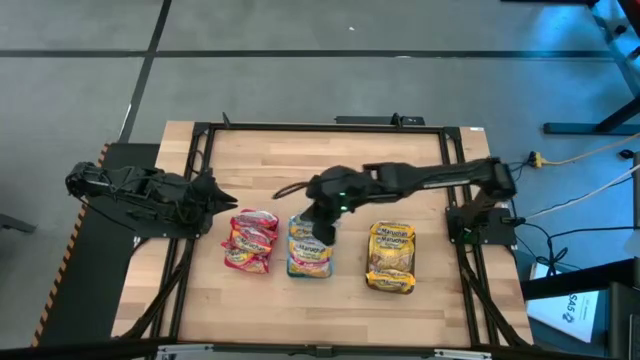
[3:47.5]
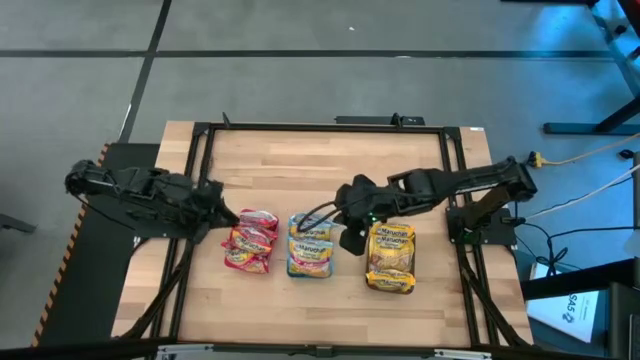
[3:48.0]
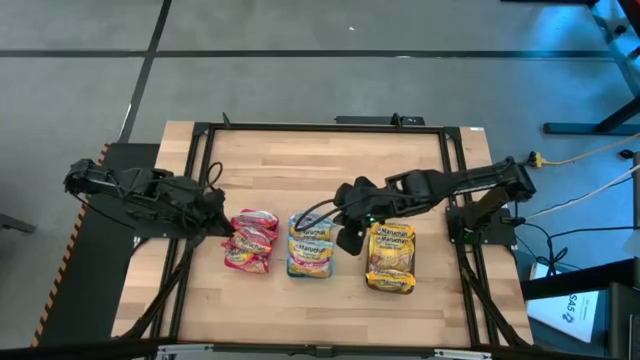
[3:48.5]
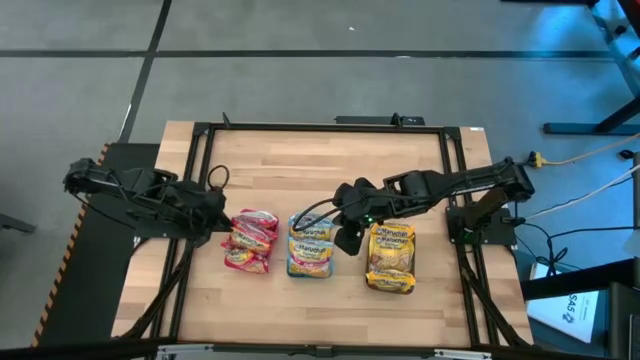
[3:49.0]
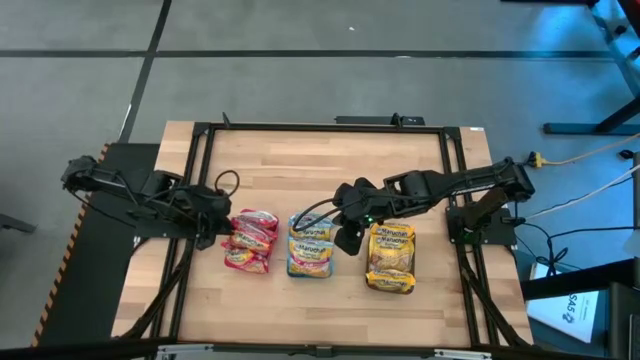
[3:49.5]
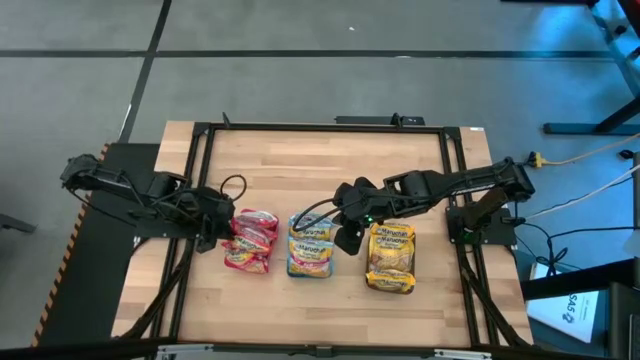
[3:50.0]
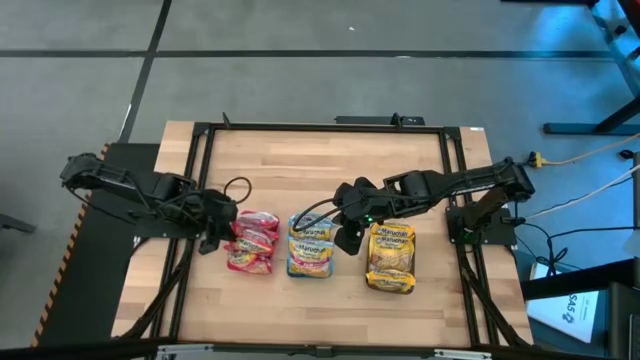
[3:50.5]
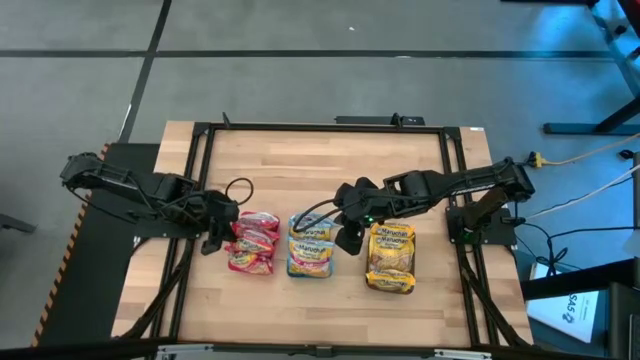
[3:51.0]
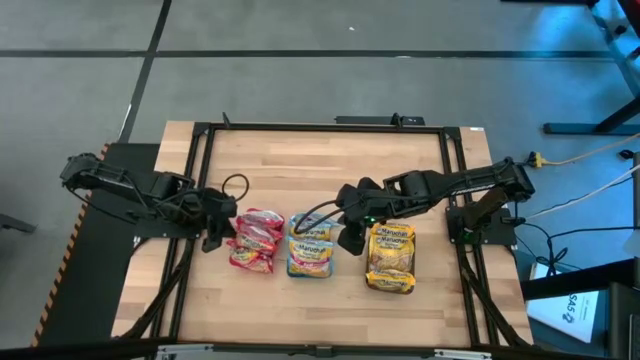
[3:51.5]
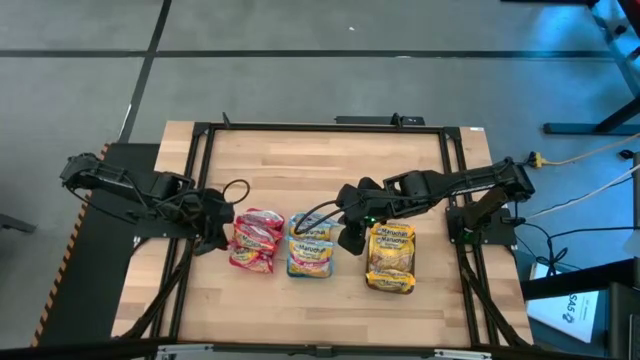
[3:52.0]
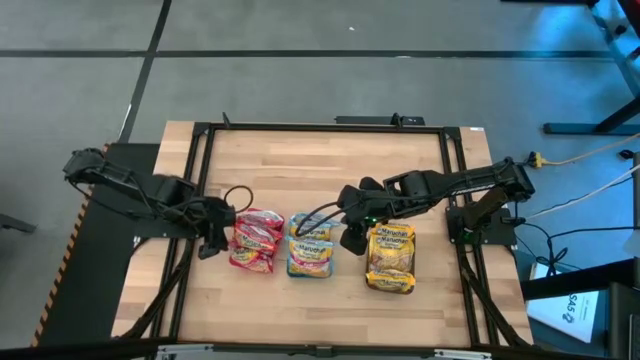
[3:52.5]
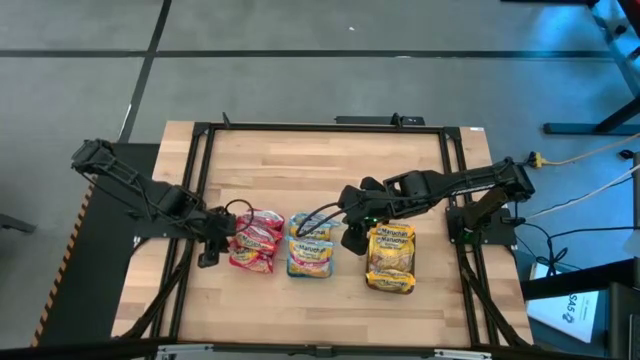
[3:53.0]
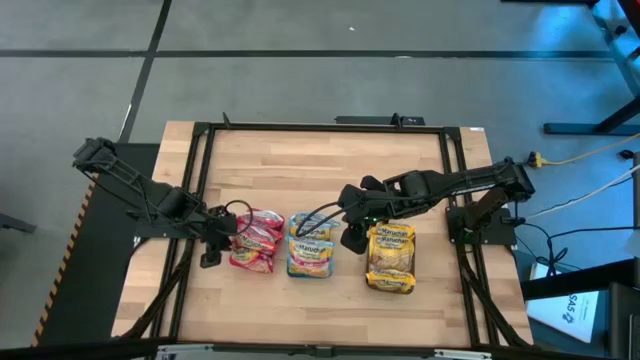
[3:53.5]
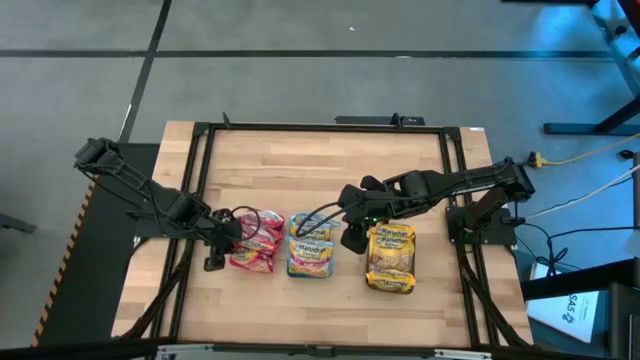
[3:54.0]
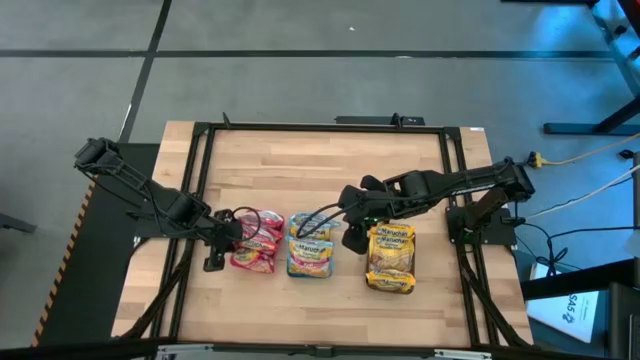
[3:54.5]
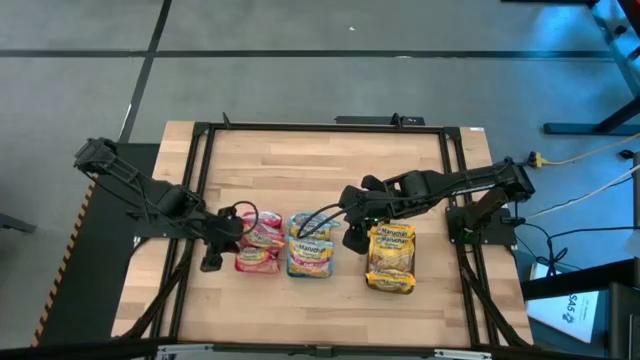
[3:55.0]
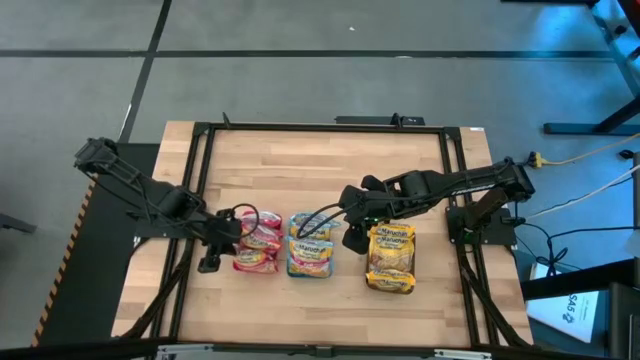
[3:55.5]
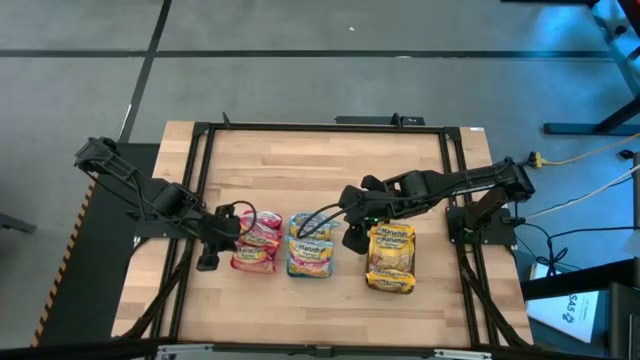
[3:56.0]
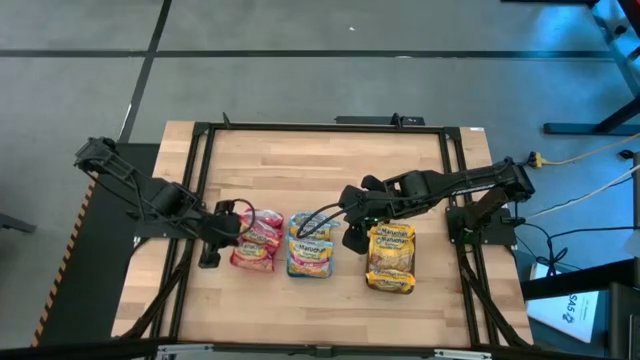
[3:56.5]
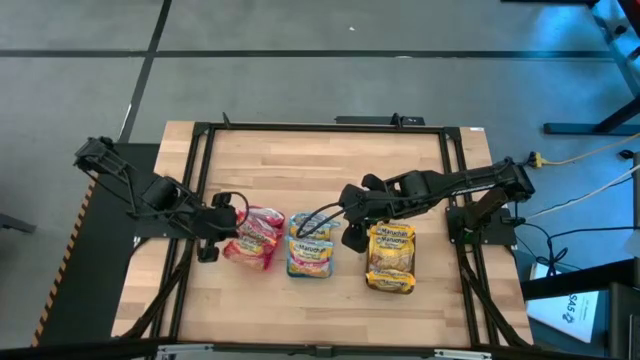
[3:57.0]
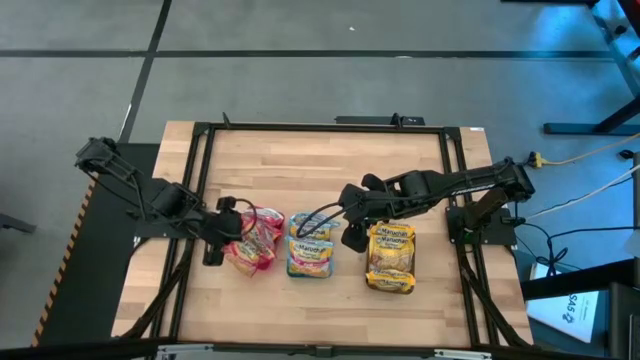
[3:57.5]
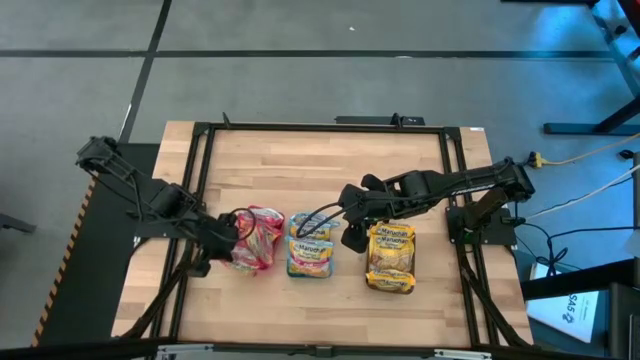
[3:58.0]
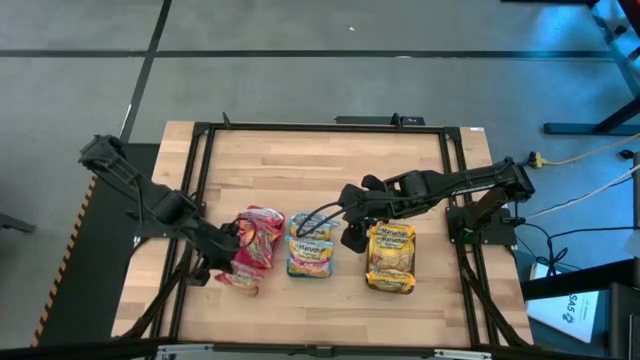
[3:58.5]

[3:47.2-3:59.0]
Task: Sort Maruchan noodles
Remove the red noodle from the red bin

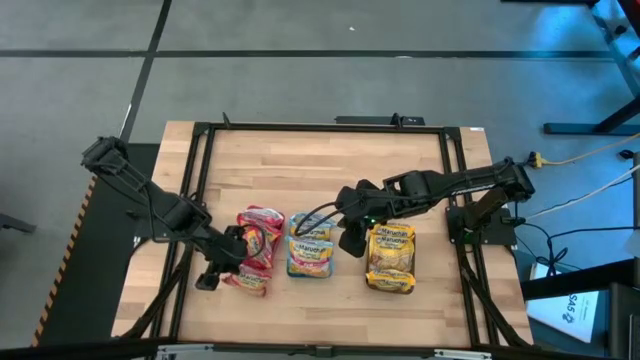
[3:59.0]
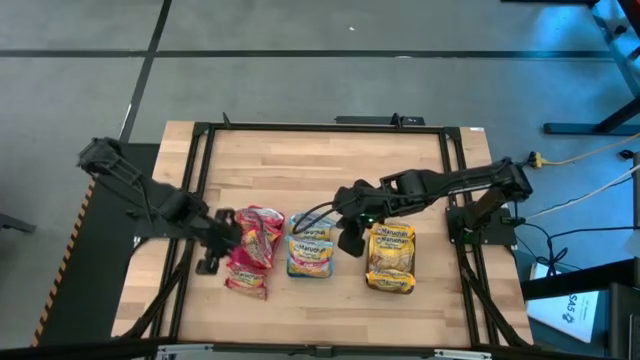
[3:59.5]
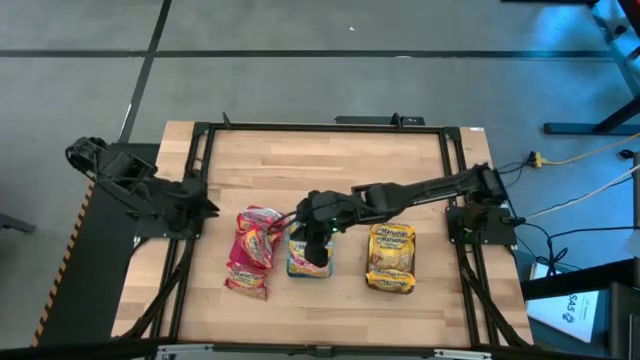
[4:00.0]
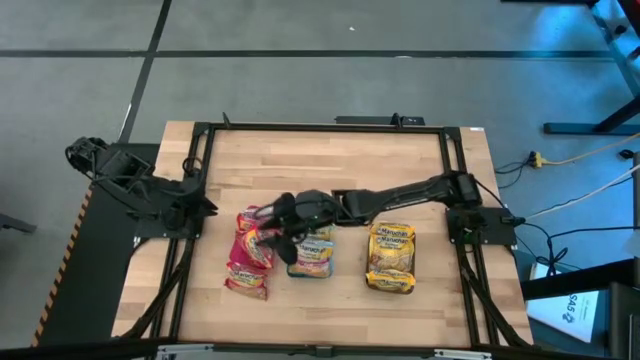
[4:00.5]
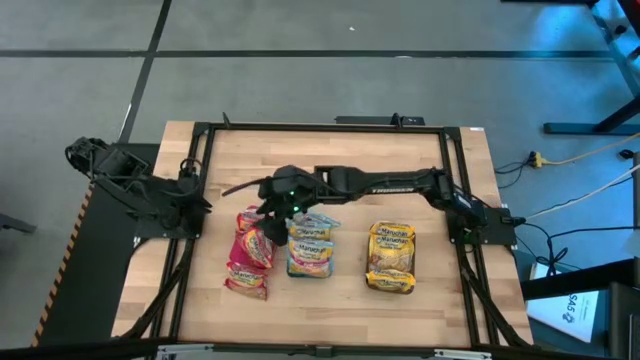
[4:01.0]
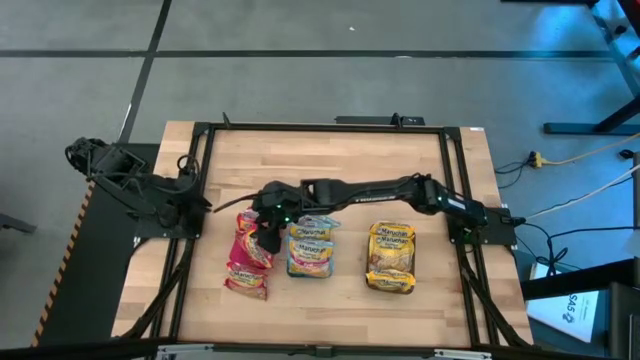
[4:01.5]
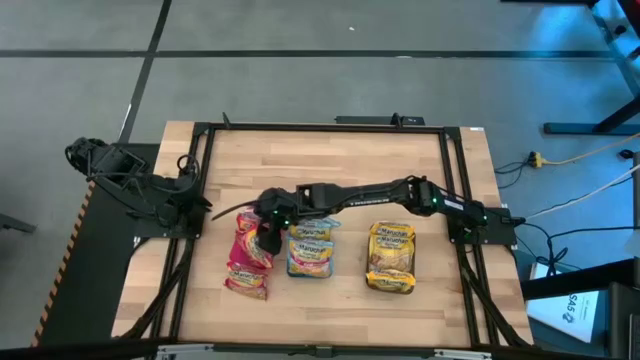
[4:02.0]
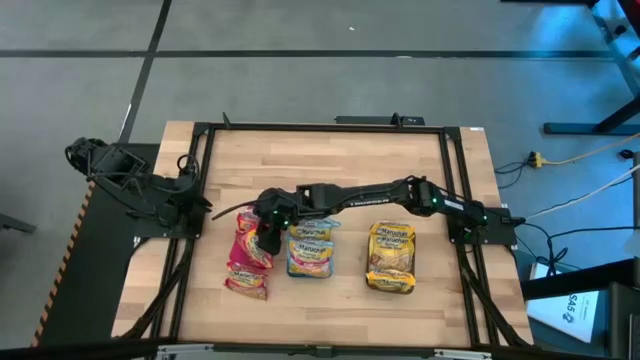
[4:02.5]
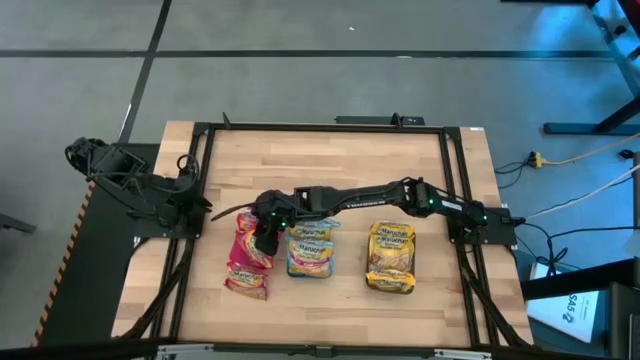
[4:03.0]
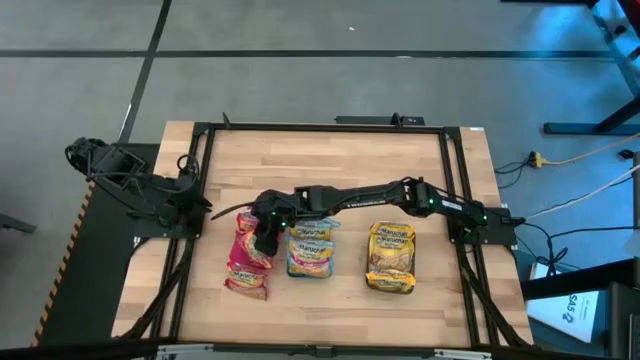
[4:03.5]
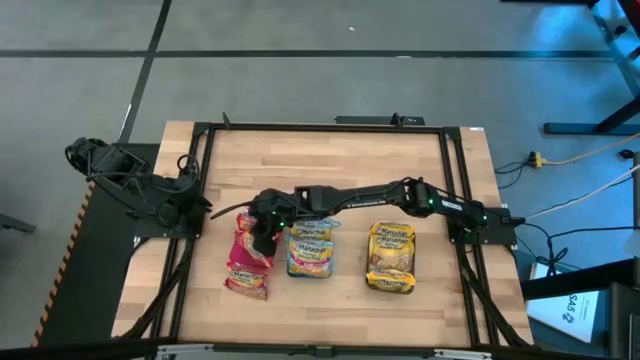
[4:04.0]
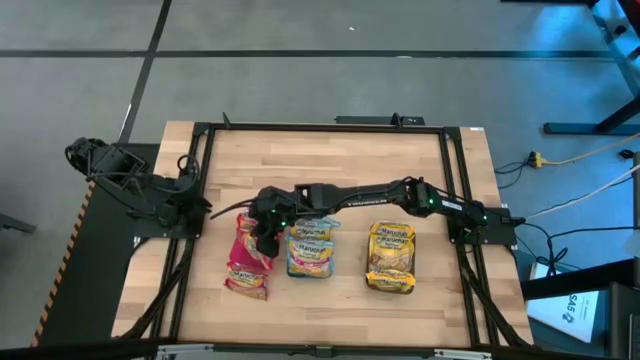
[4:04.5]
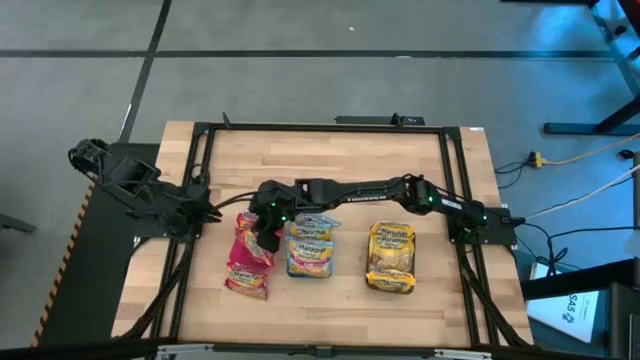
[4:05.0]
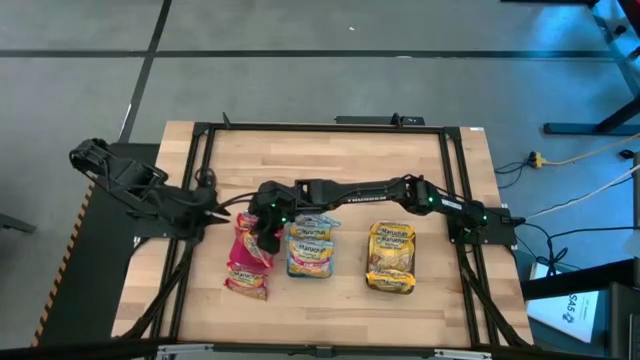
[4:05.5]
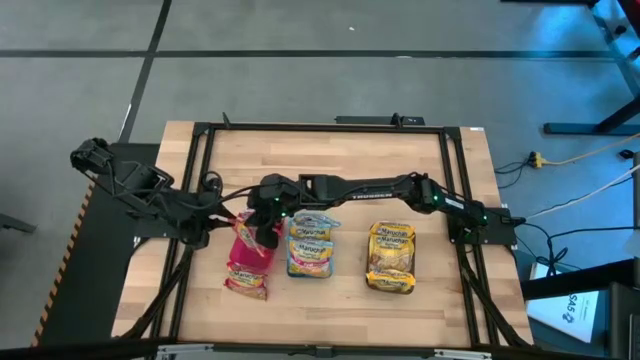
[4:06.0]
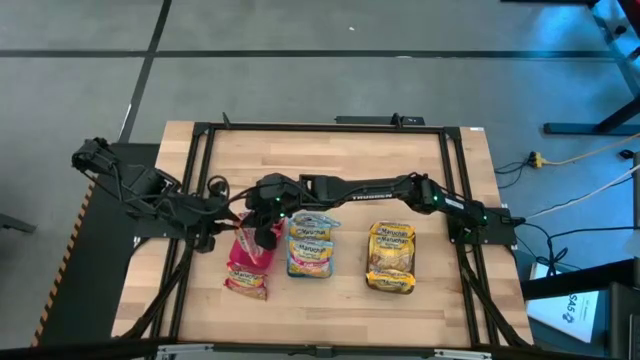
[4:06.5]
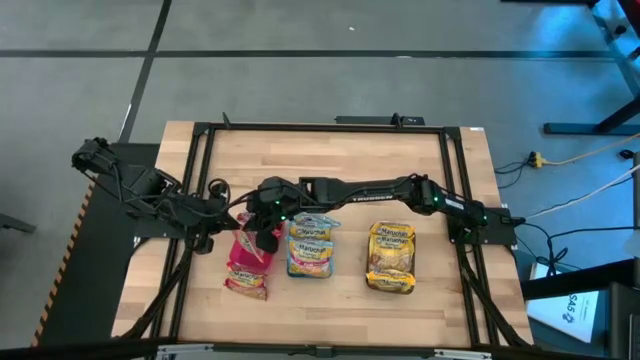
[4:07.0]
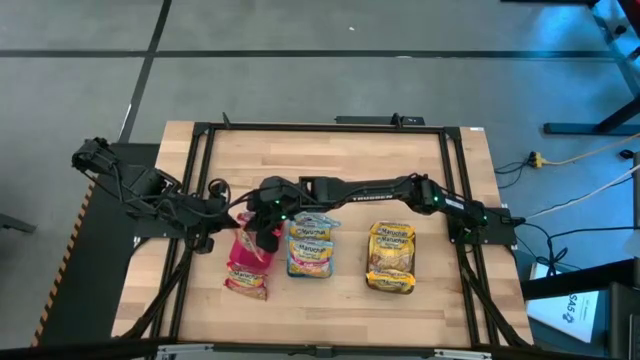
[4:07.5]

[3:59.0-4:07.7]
Adjust the red noodle packs in the red bin
